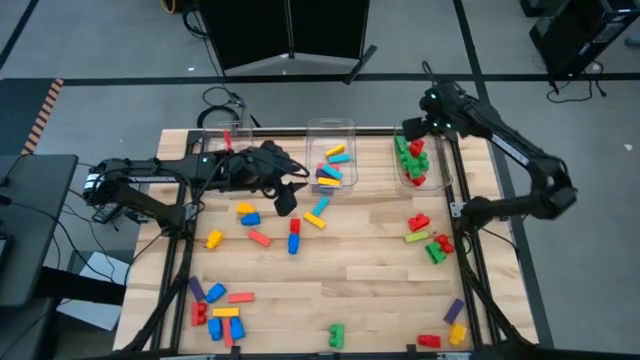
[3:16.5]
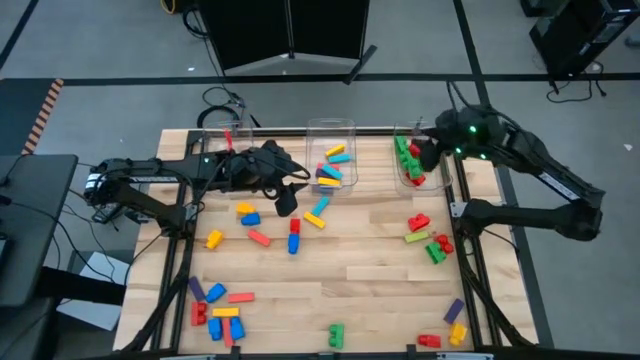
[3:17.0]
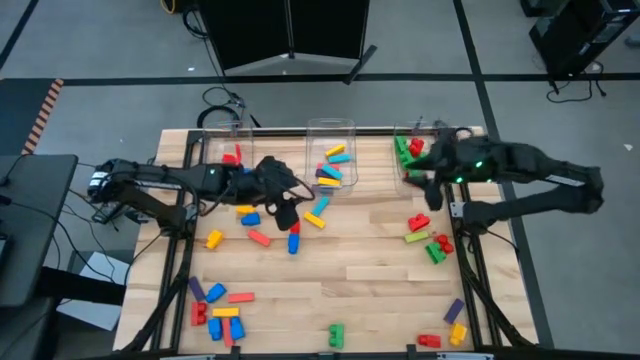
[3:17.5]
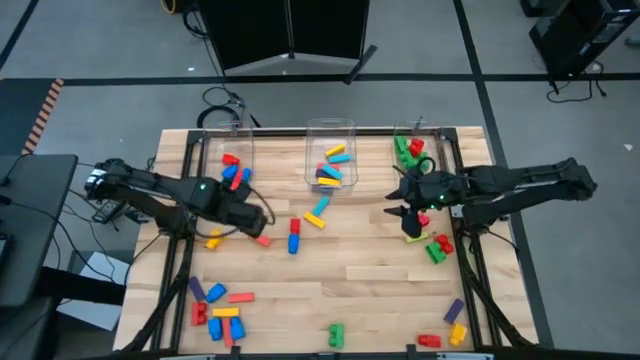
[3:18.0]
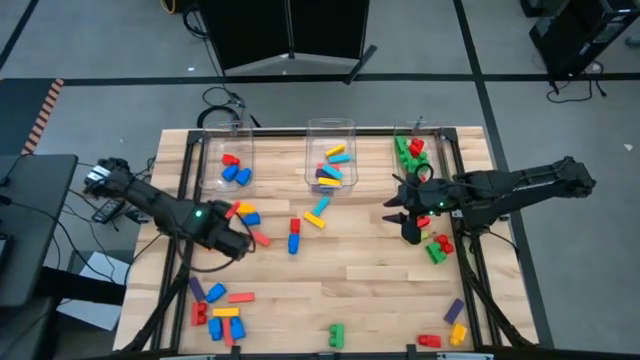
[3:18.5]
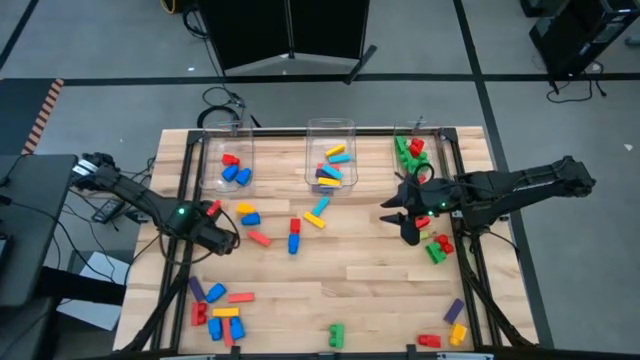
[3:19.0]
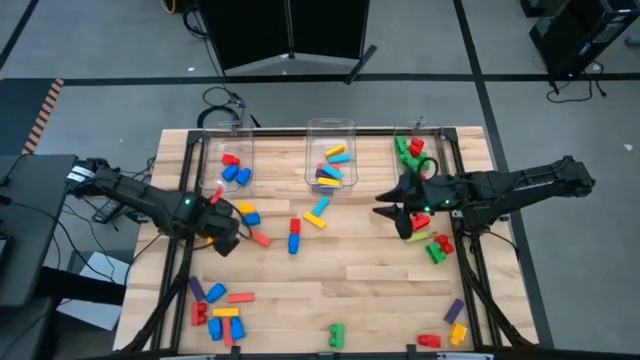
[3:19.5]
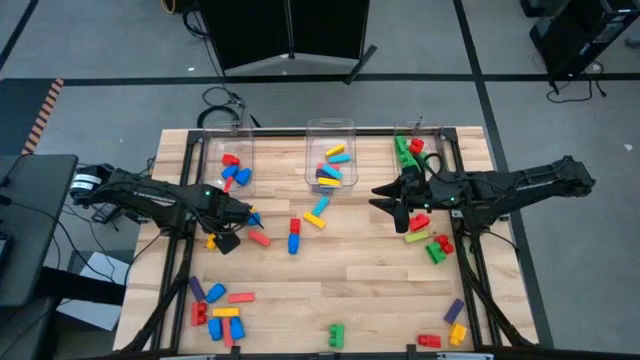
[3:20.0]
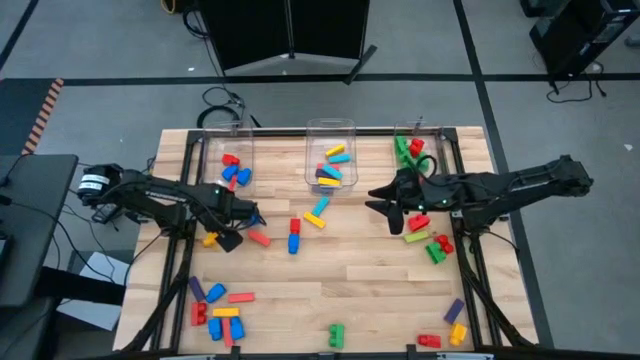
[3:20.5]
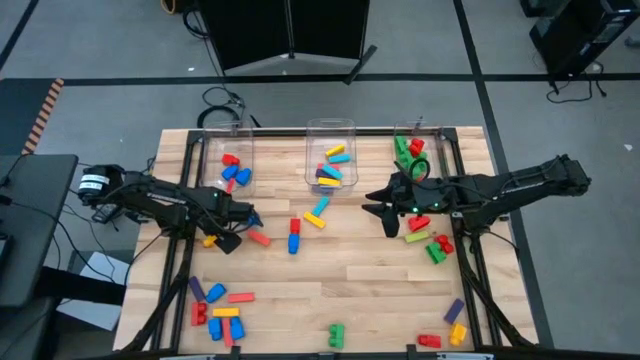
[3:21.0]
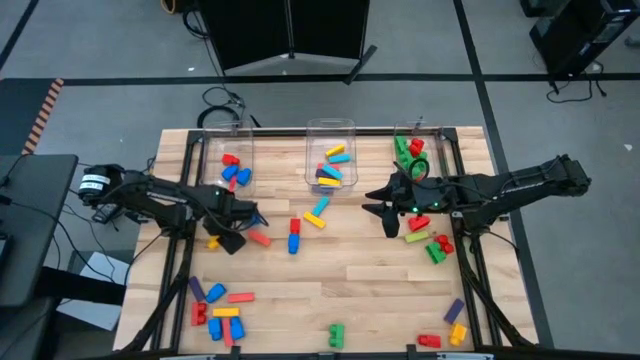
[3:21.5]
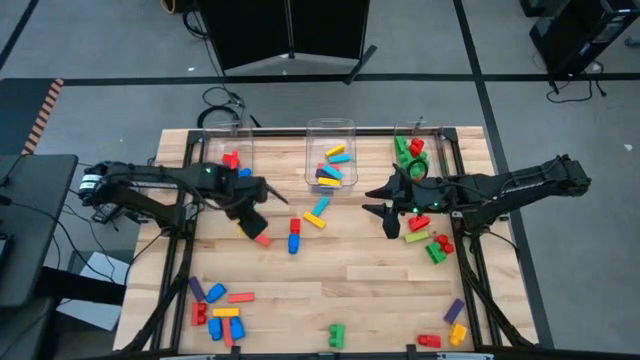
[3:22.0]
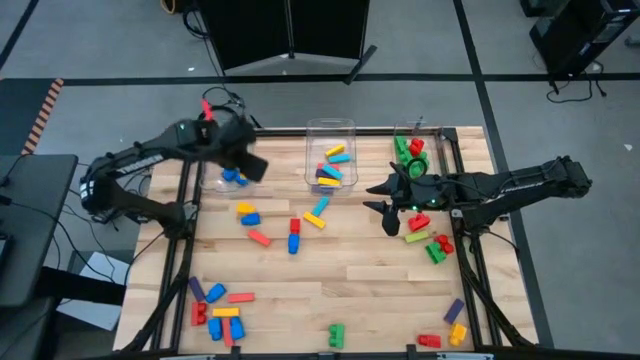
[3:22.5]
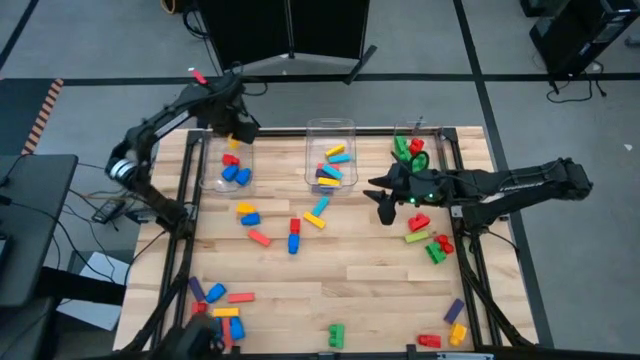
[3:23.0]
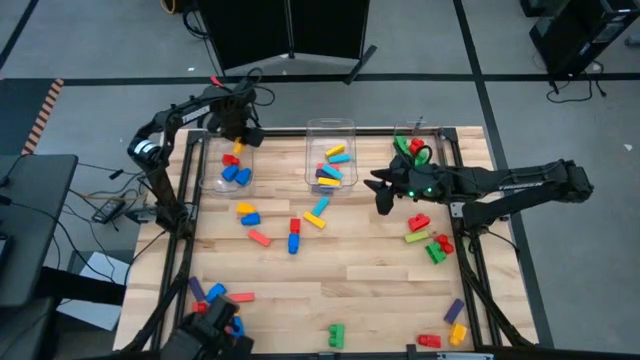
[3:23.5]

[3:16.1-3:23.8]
Task: Sort blocks by size
Put the yellow 1 stud game piece into the left transparent bin

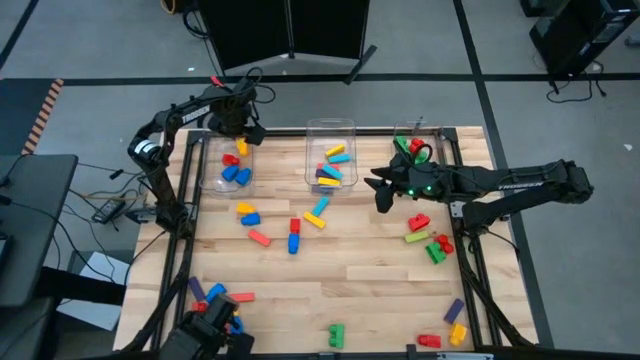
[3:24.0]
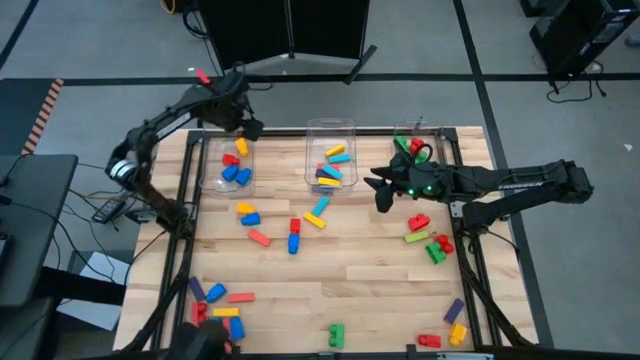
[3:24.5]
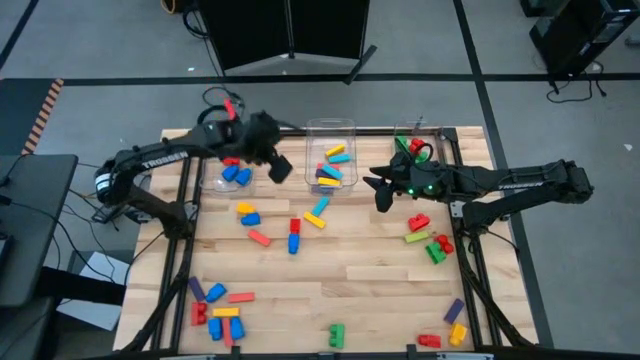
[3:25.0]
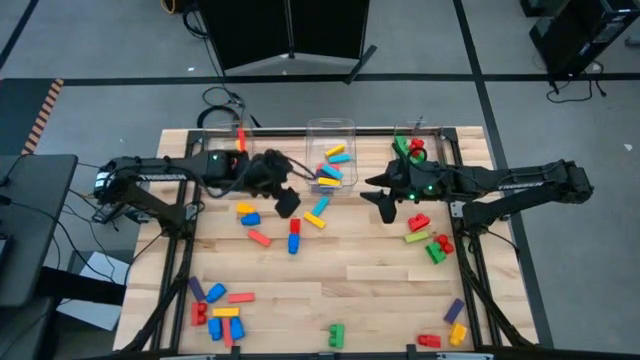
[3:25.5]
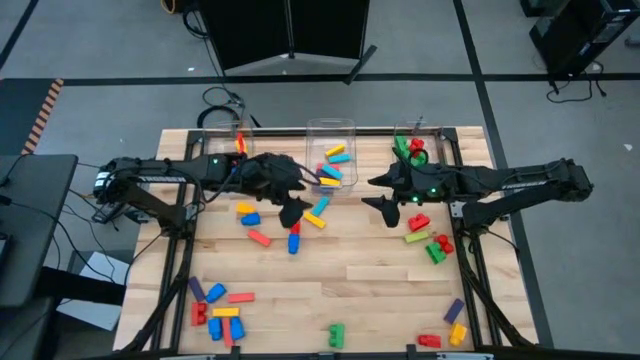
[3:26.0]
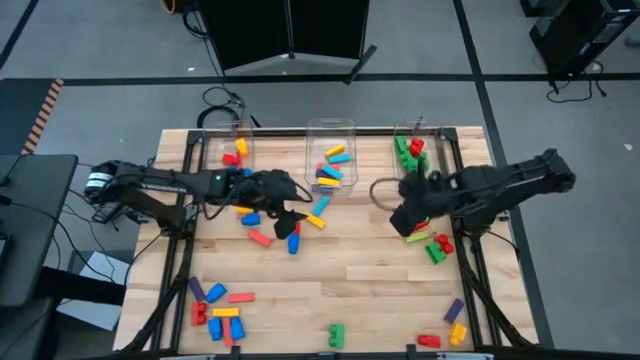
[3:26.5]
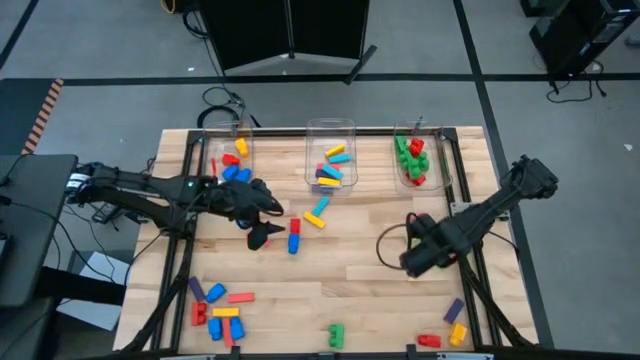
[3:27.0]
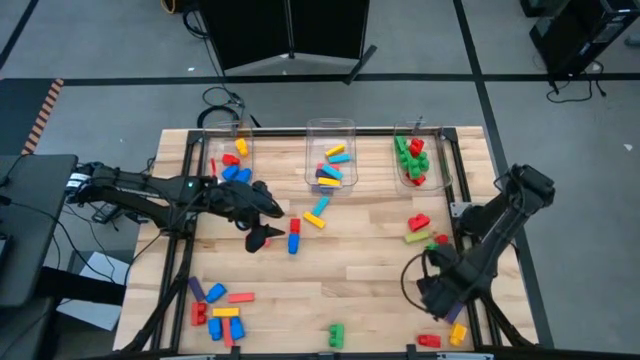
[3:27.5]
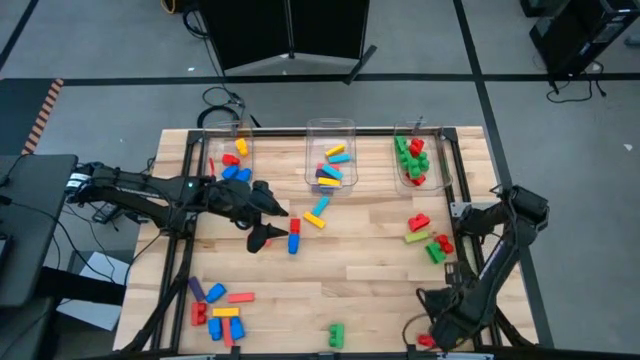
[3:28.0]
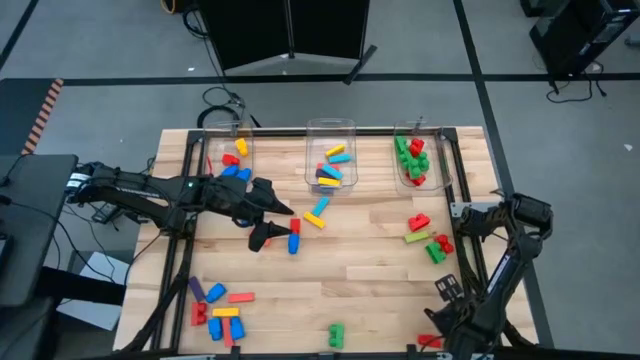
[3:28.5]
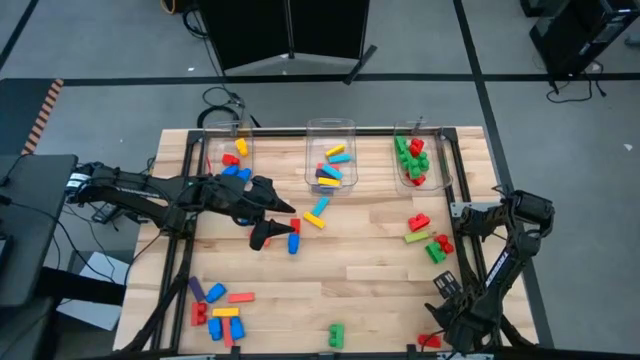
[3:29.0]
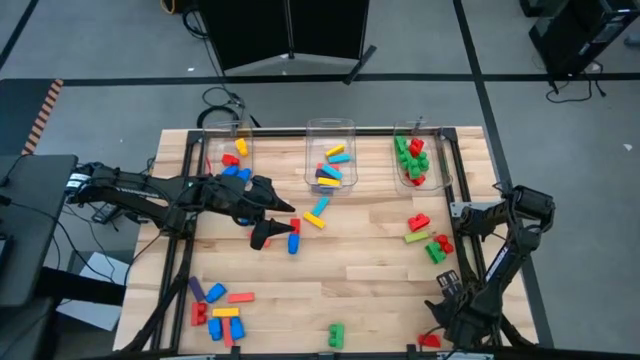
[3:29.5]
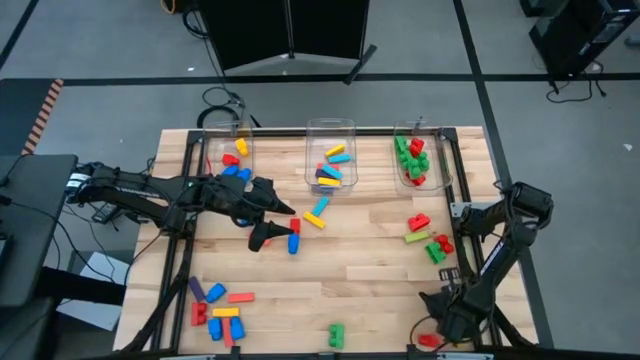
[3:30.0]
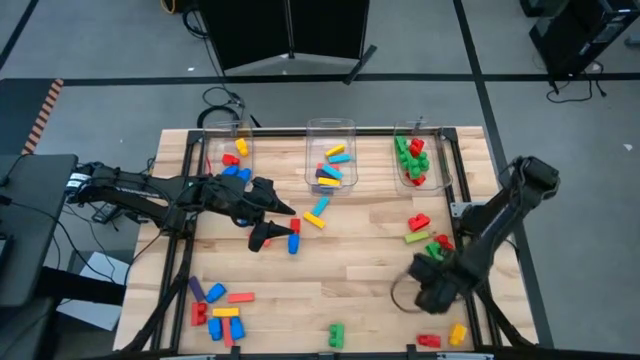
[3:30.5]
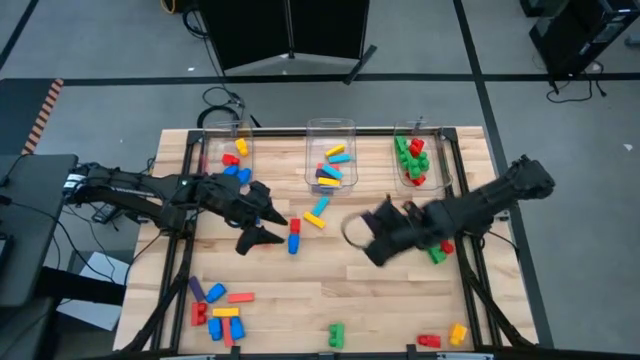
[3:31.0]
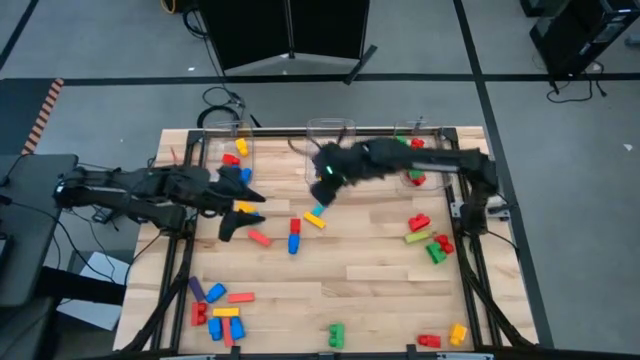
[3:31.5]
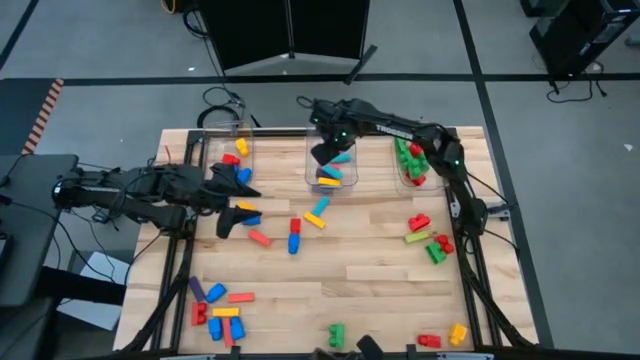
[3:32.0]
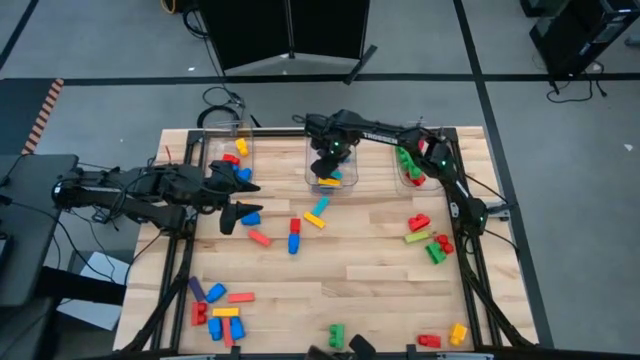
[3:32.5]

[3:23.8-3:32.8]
Put the purple block into the middle transparent bin

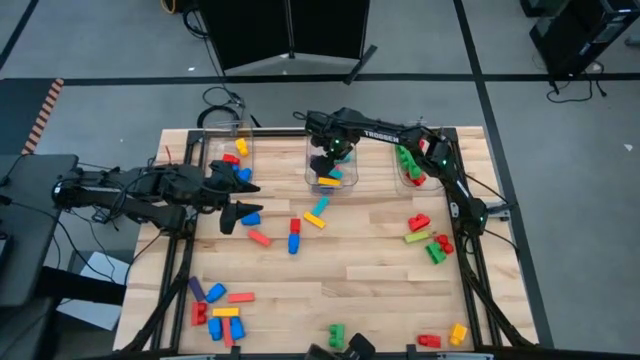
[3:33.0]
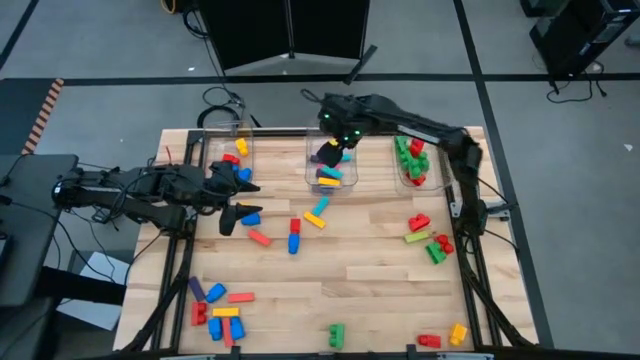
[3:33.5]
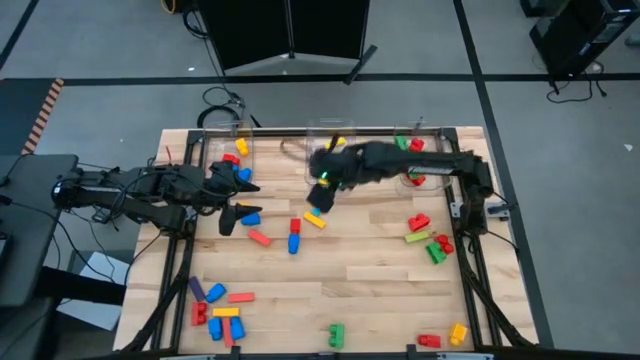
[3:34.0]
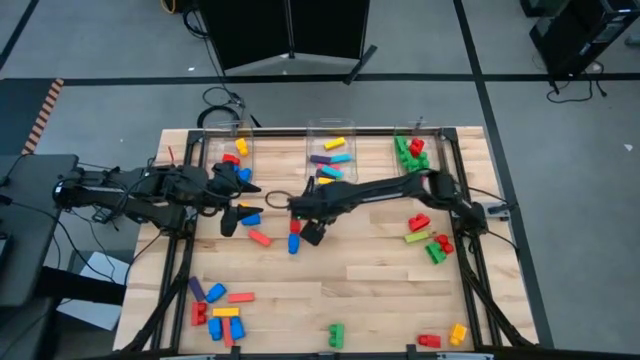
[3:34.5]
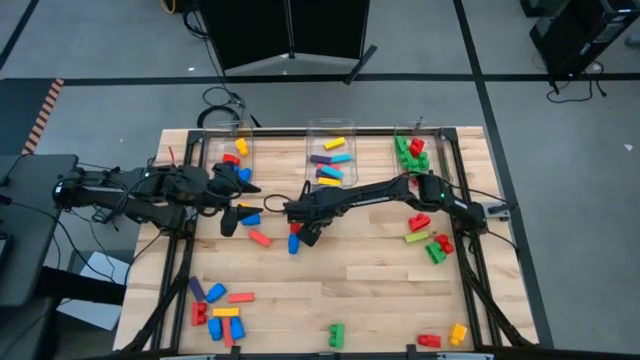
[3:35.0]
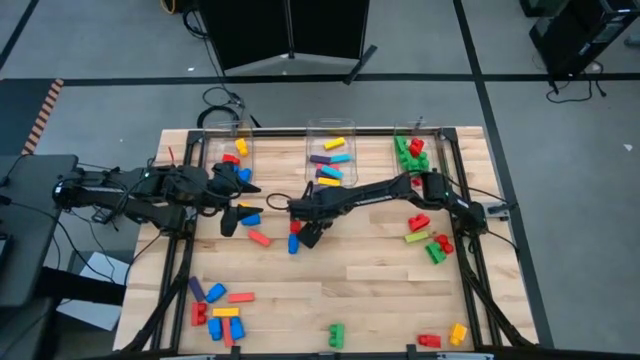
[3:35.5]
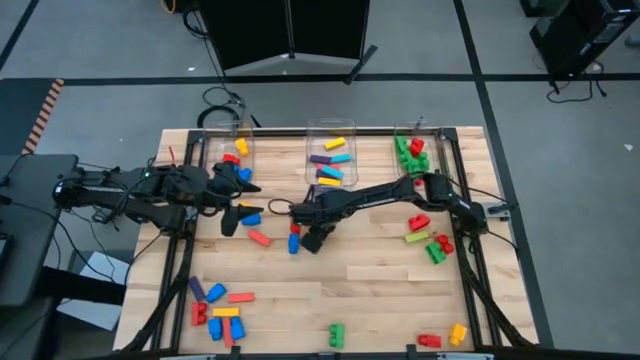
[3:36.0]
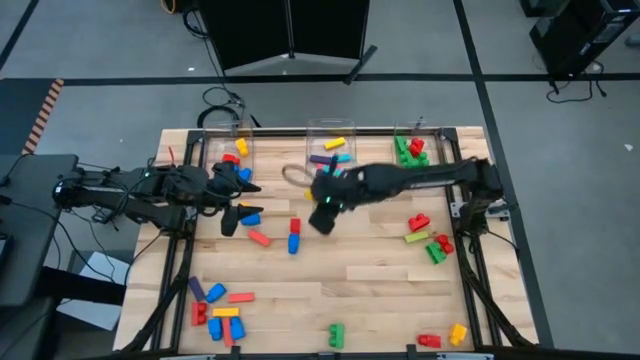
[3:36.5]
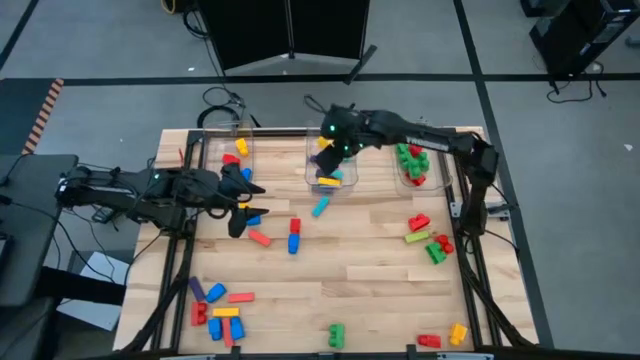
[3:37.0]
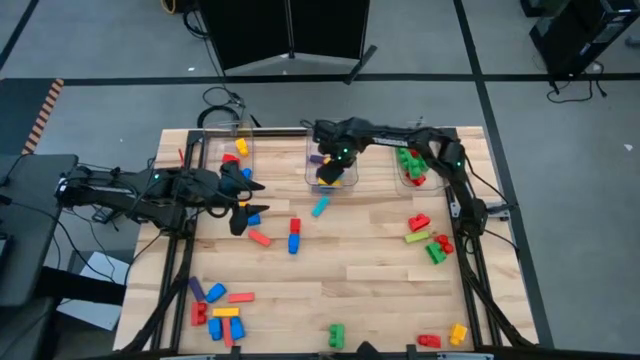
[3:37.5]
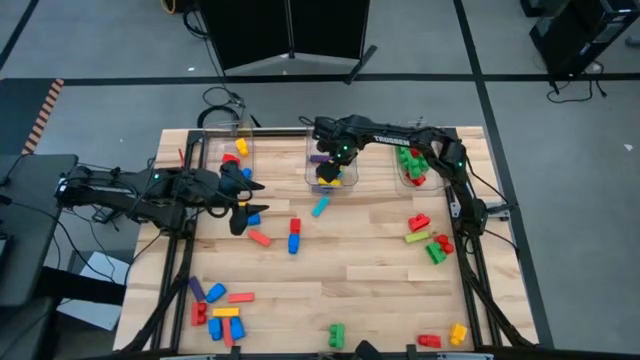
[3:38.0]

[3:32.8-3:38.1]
Put the yellow block into the middle transparent bin
